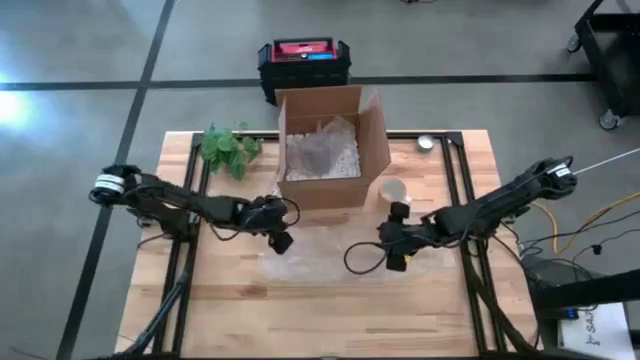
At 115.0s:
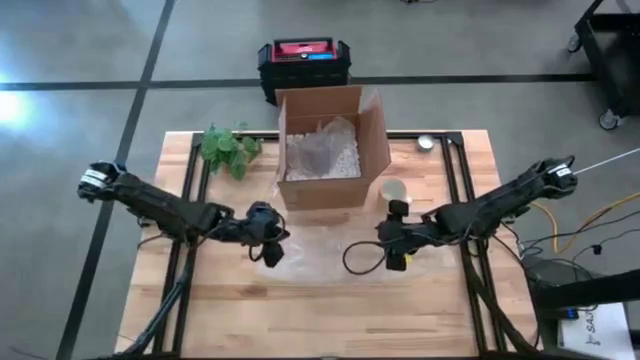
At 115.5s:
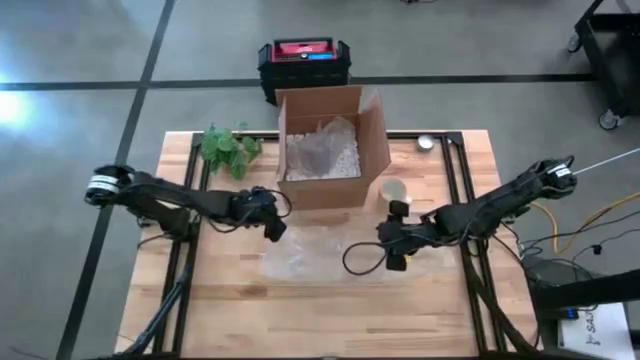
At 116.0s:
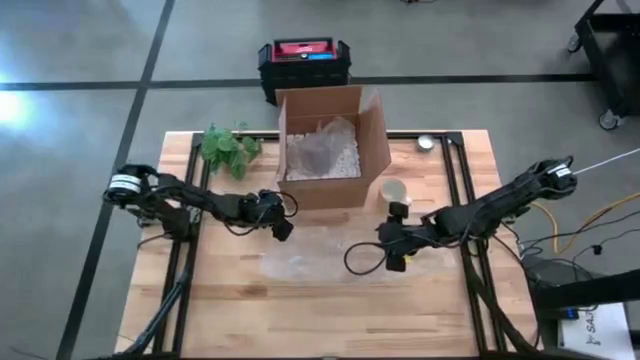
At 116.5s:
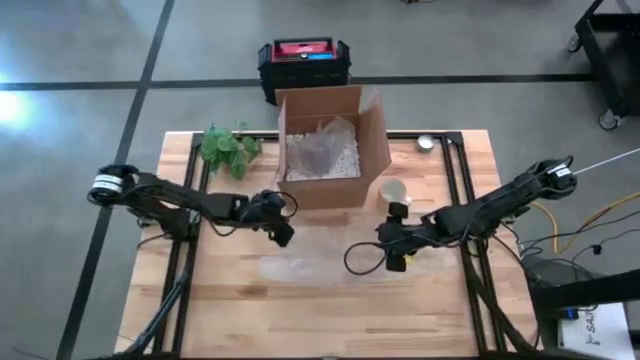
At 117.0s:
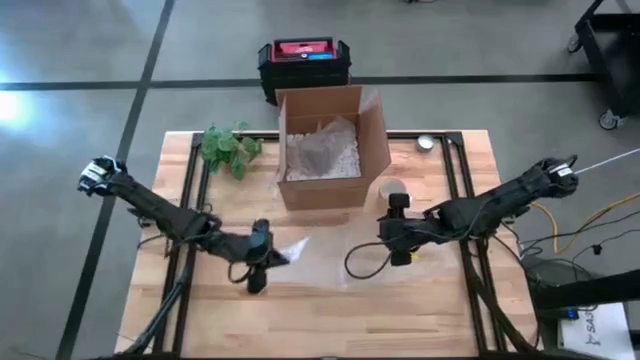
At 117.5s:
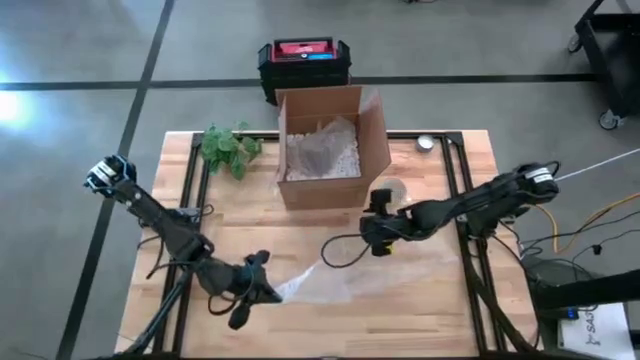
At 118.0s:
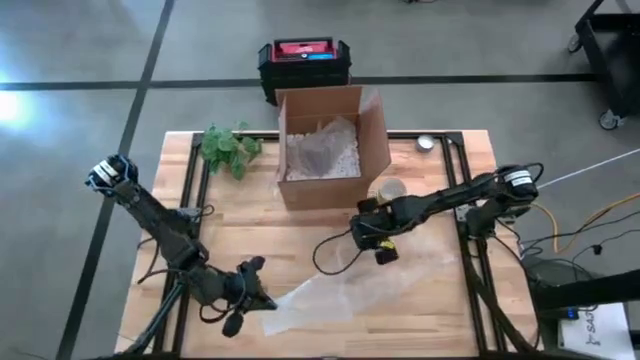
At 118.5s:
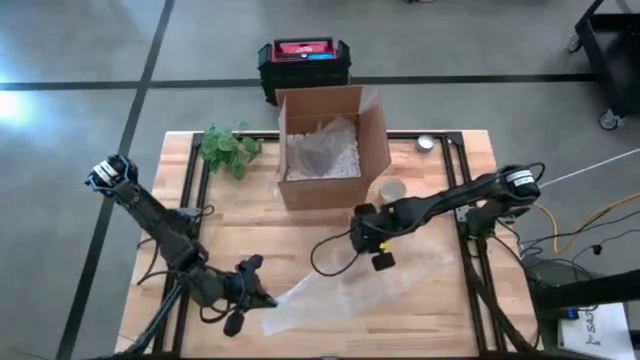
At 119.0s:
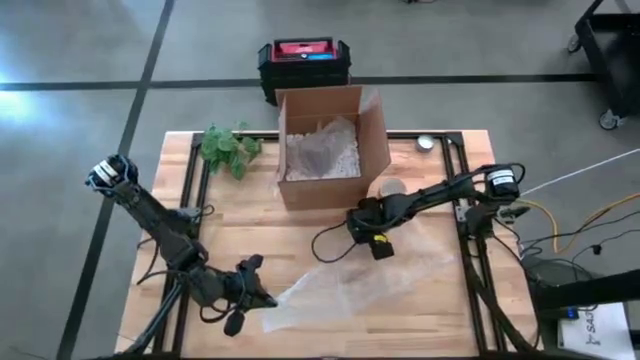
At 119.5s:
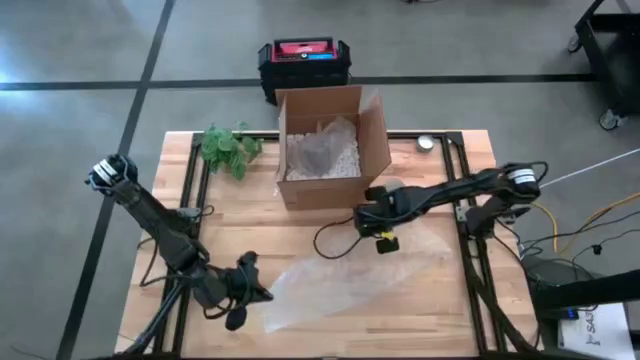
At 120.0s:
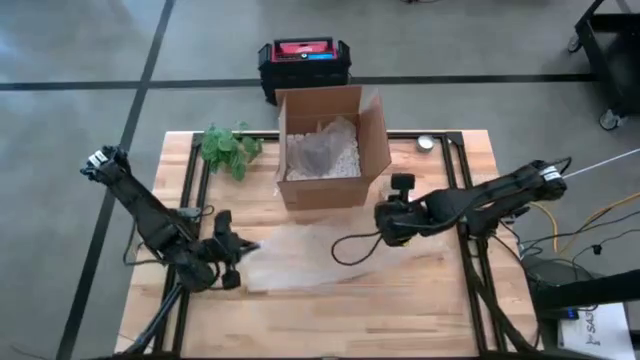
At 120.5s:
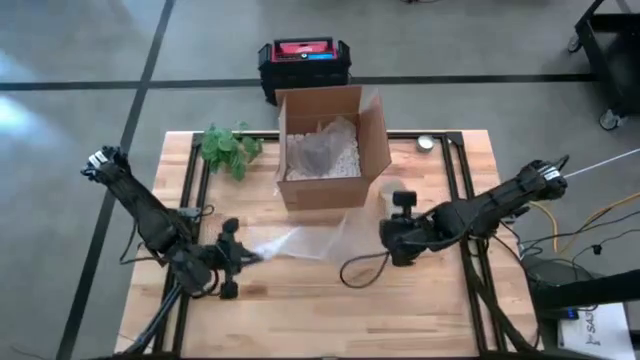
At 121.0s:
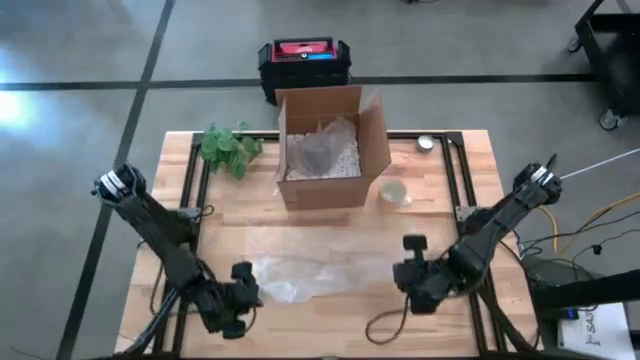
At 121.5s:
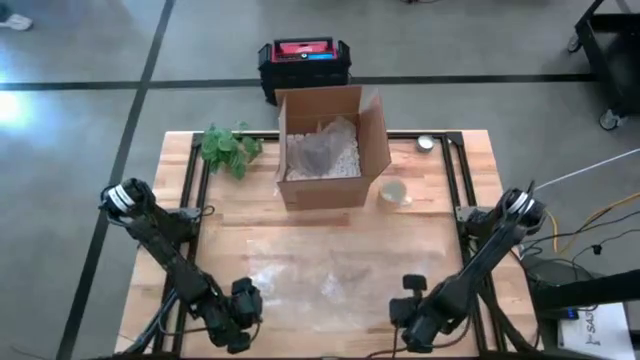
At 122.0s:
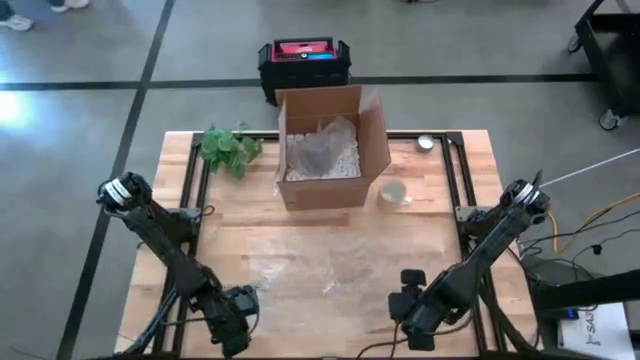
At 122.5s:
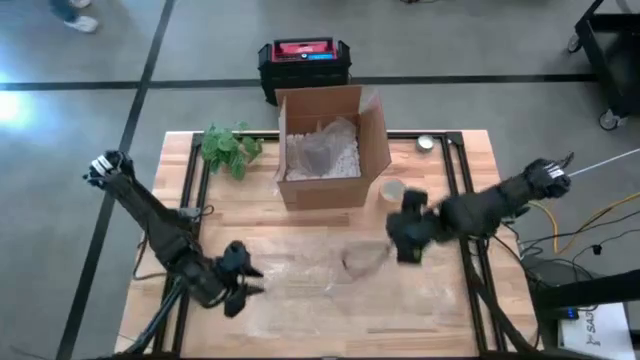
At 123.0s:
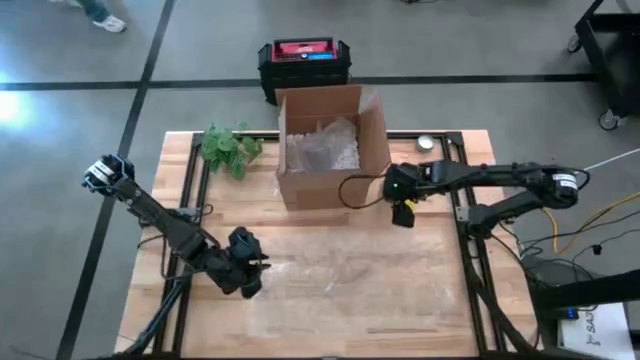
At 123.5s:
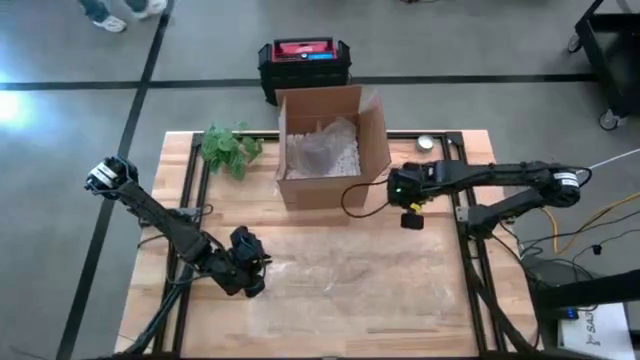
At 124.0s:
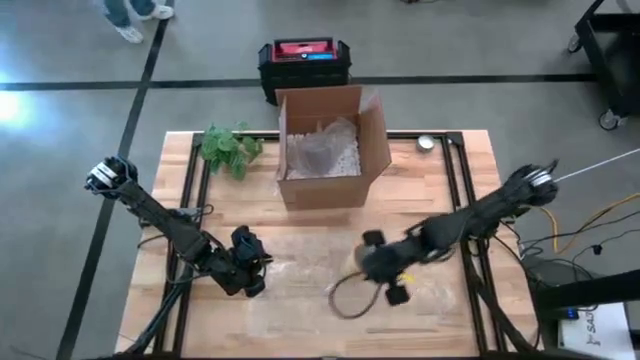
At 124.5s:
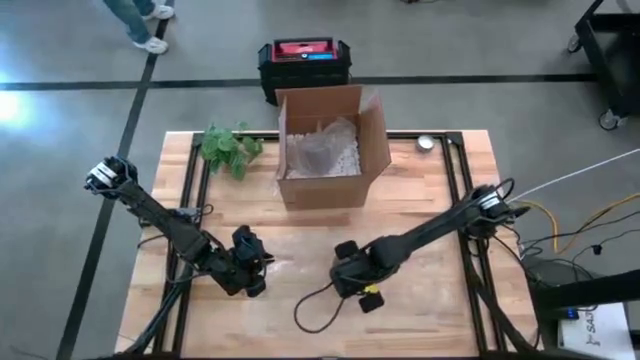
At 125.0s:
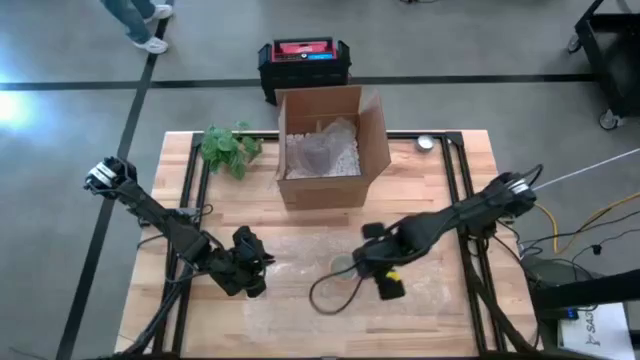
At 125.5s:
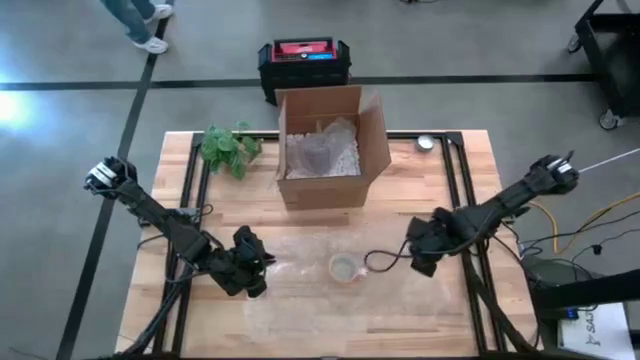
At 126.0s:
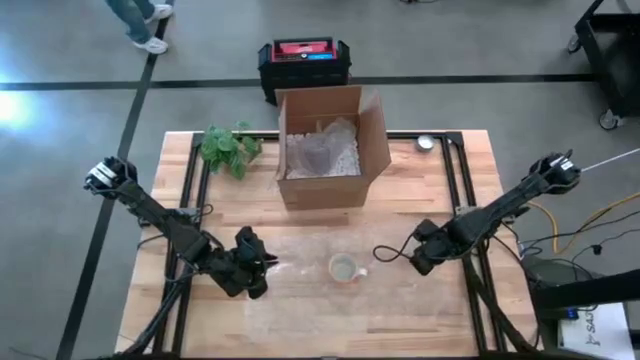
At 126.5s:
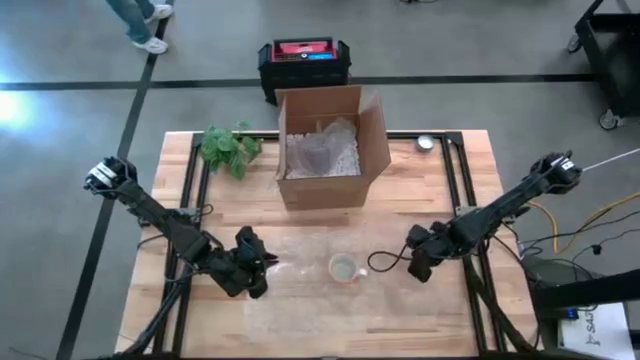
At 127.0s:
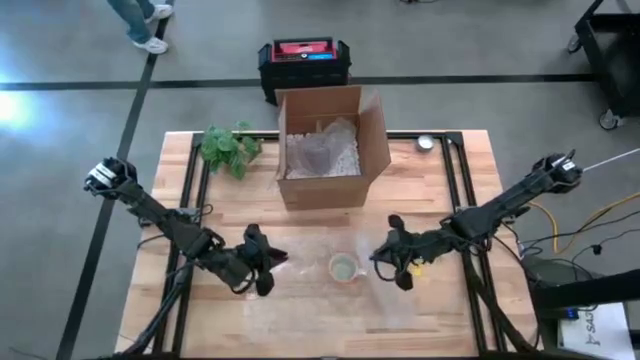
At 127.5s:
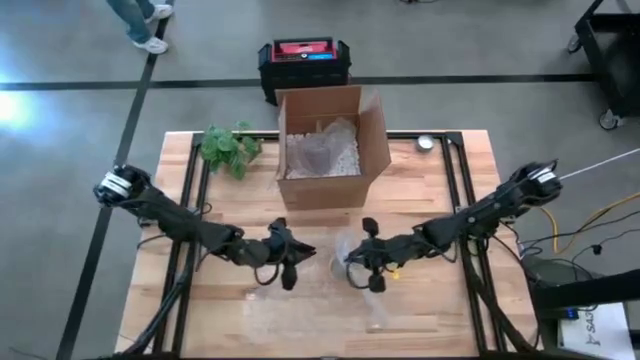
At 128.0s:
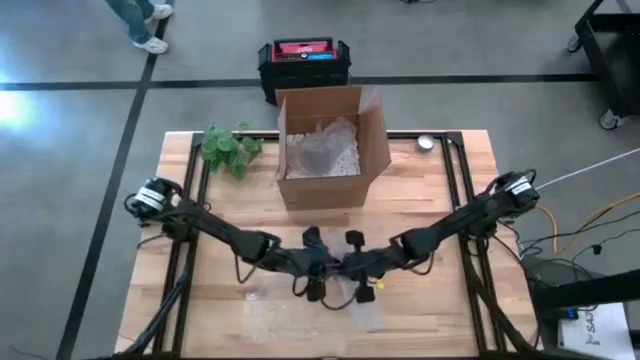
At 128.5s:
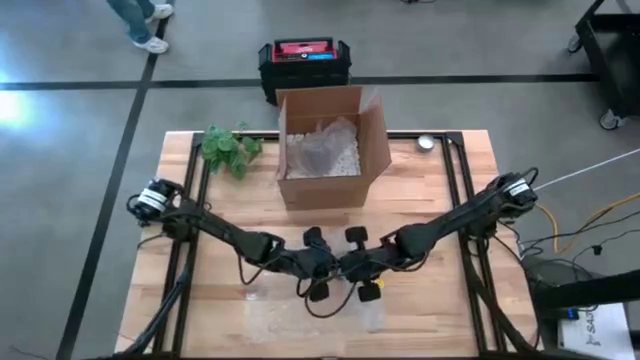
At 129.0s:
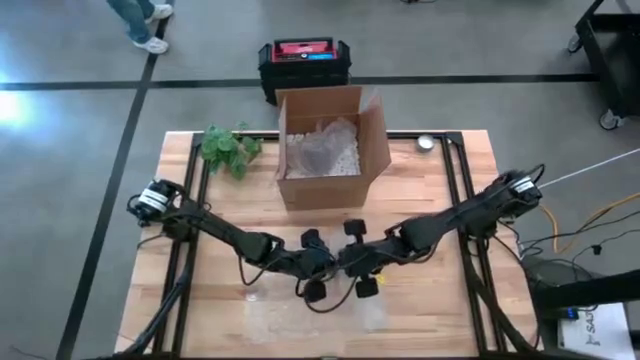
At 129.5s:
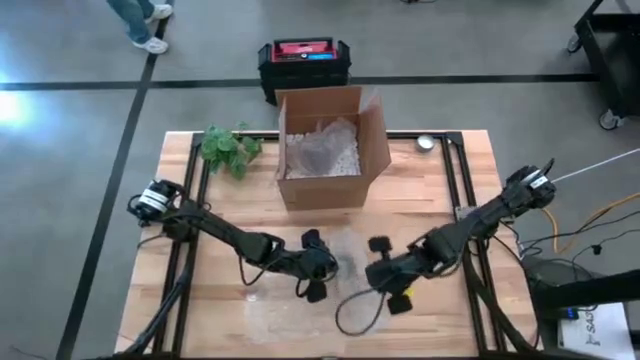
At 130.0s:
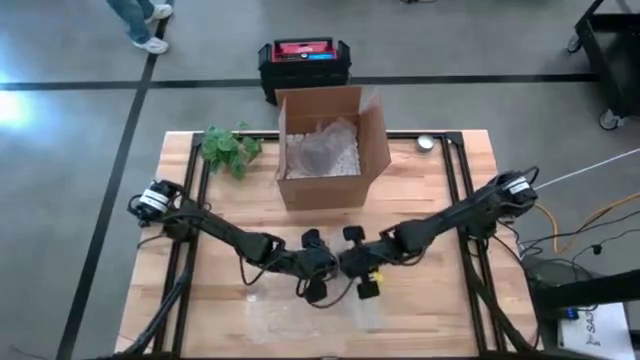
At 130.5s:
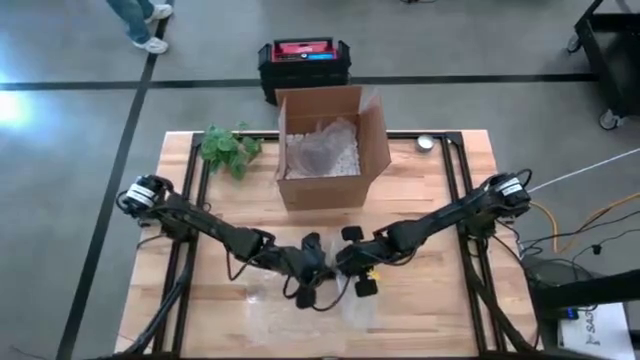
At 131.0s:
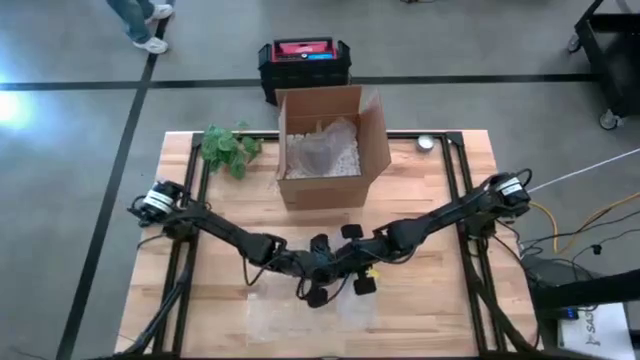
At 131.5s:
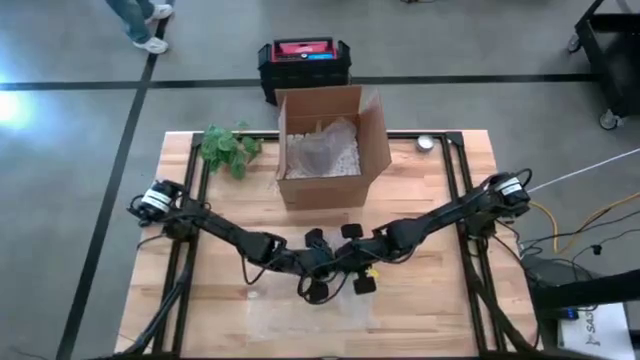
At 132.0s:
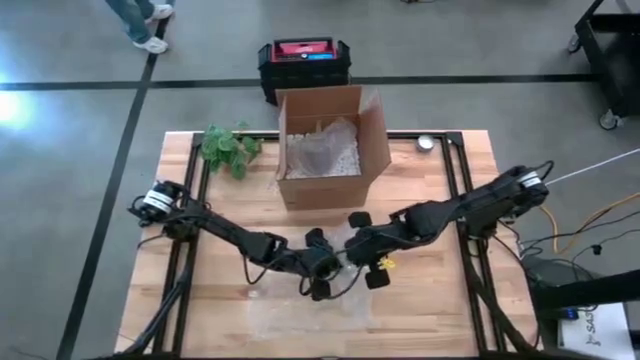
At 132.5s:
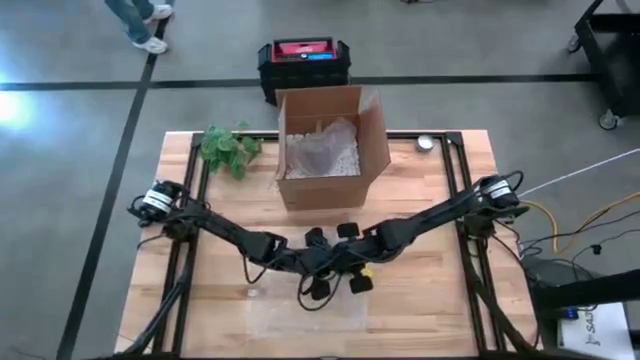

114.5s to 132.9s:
Task: wrap mug
Wrap the yellow mug with a bubble wrap

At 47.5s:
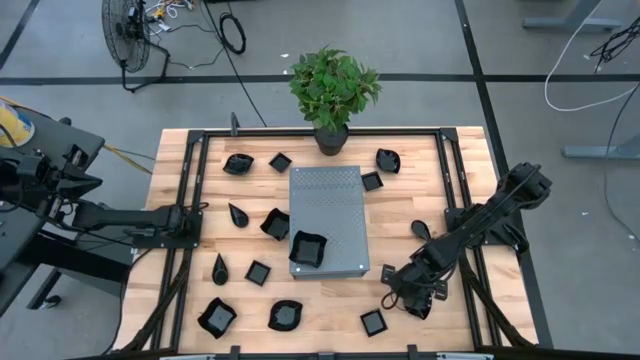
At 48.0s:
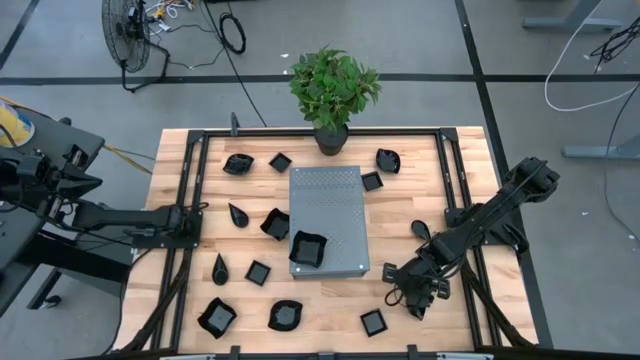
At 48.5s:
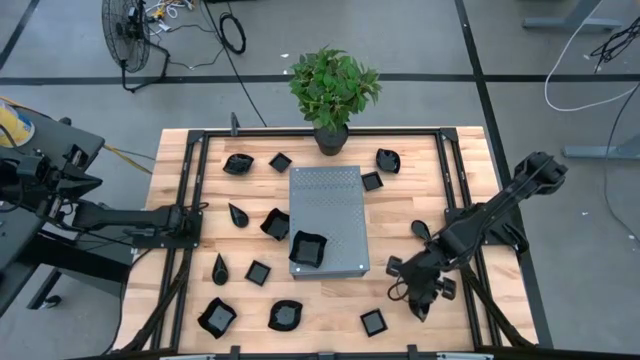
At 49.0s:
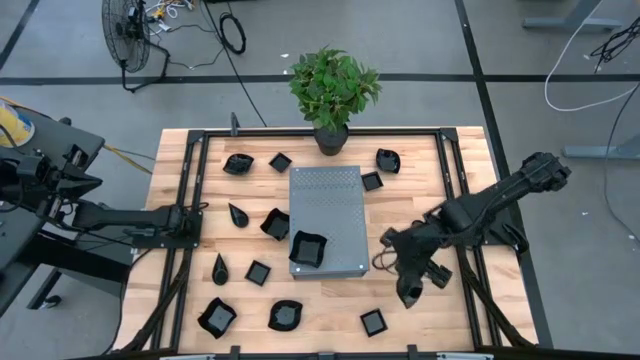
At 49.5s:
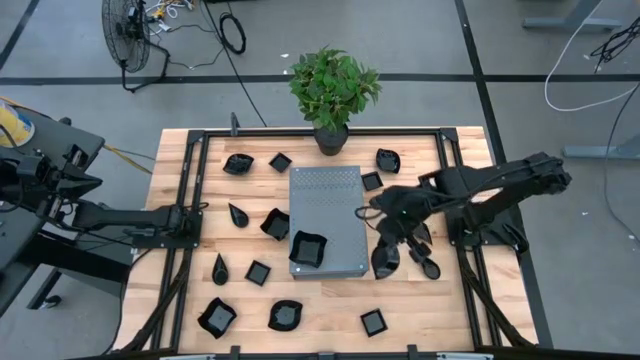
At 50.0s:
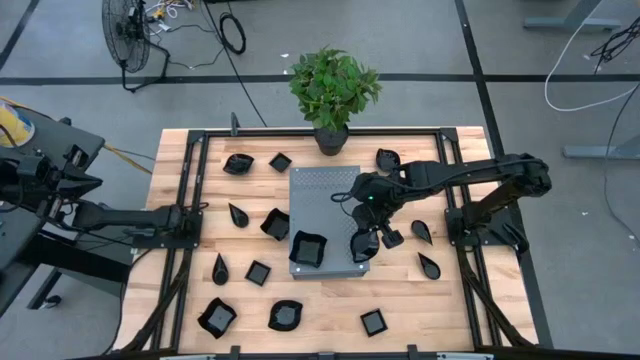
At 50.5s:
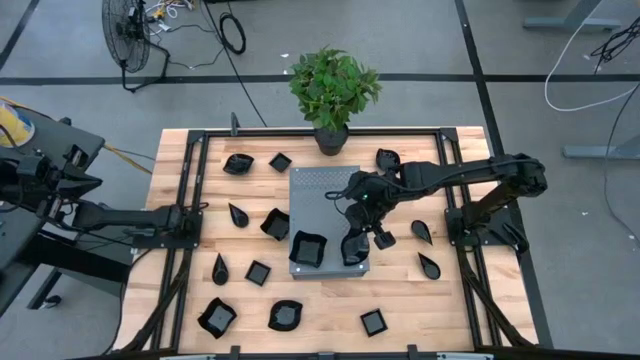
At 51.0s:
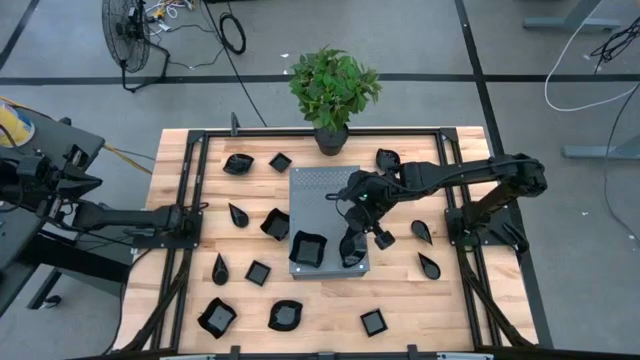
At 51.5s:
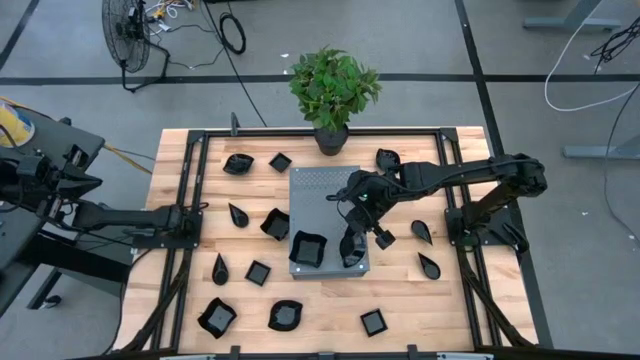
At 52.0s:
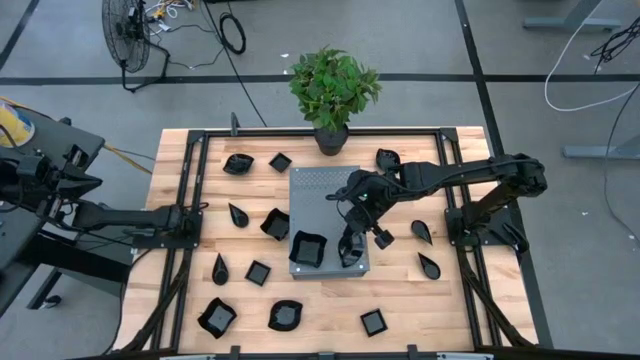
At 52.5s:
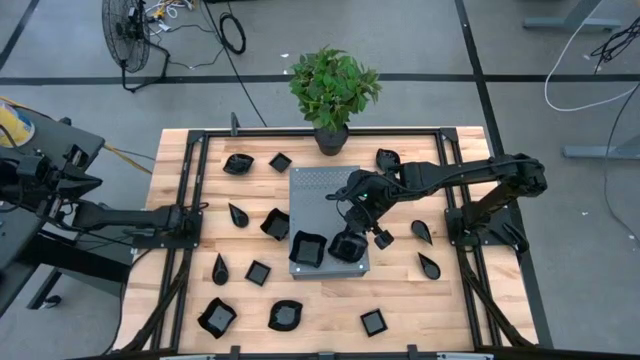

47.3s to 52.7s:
Task: Pick & Place Mini shaped plates
Put the black bowl on the shelf
